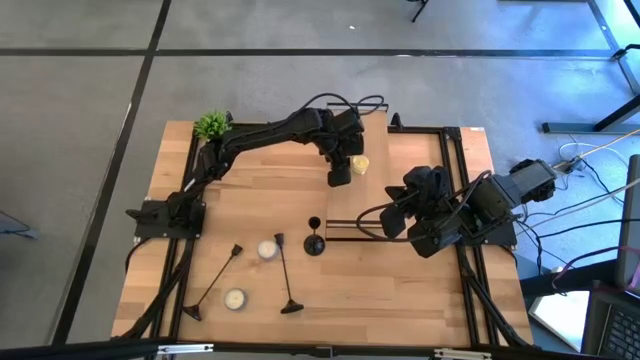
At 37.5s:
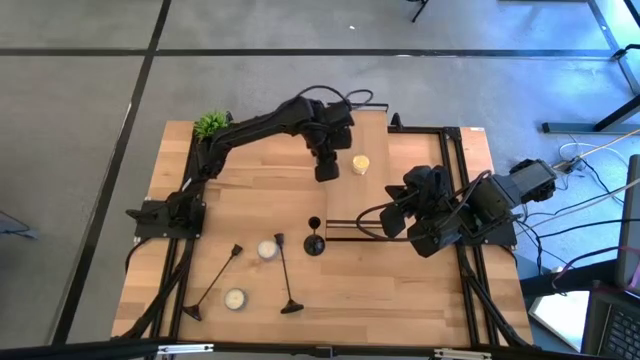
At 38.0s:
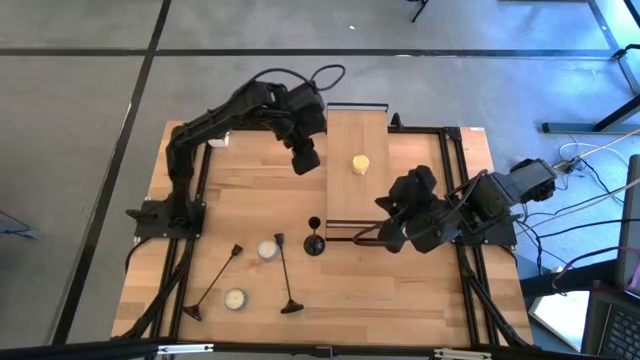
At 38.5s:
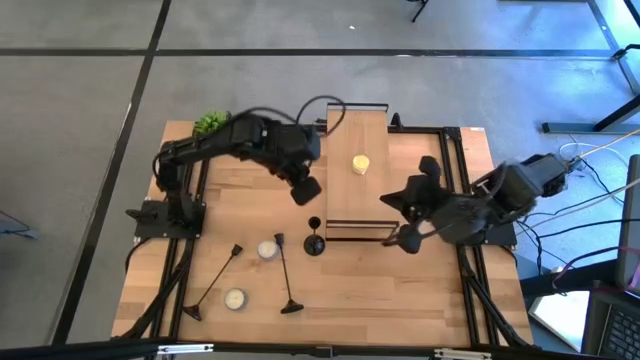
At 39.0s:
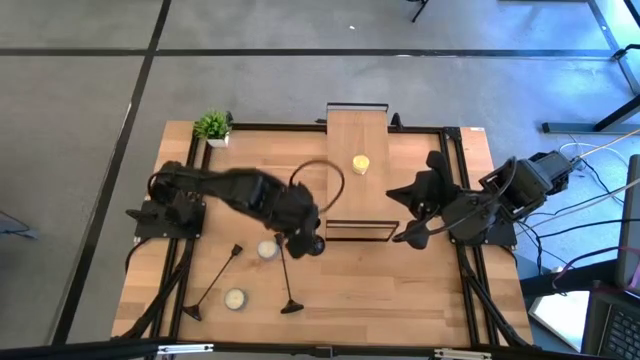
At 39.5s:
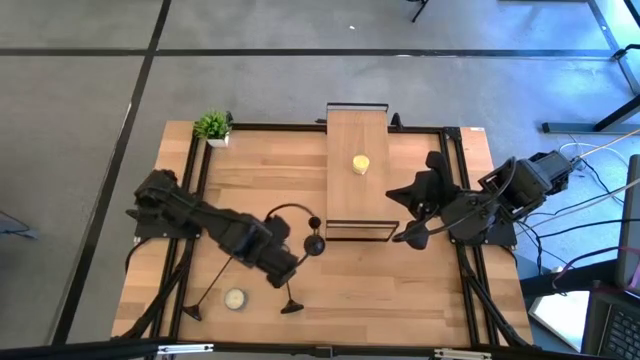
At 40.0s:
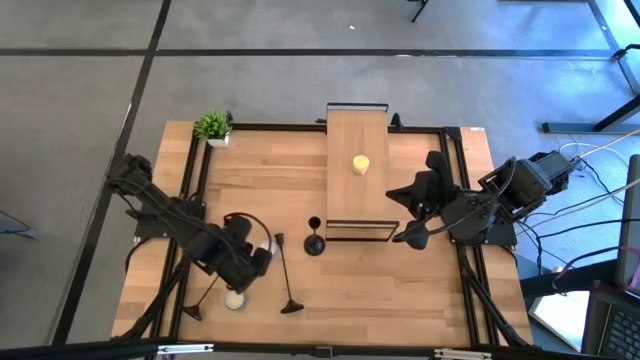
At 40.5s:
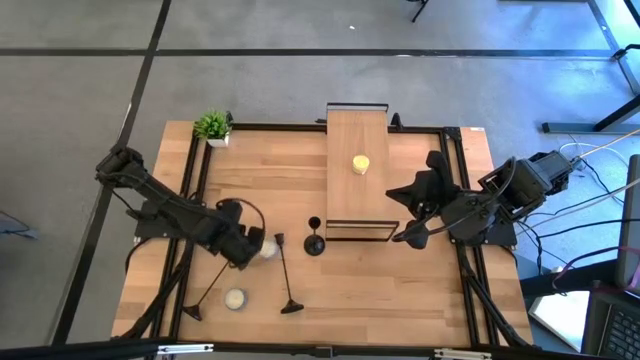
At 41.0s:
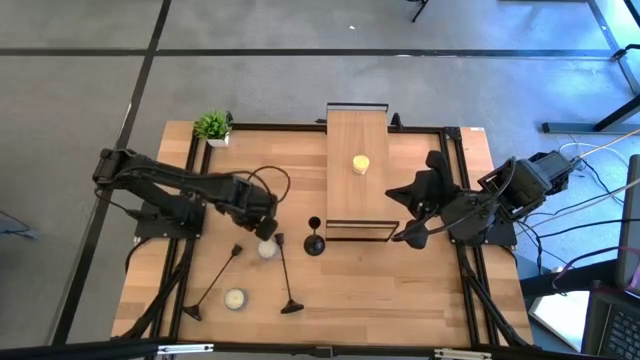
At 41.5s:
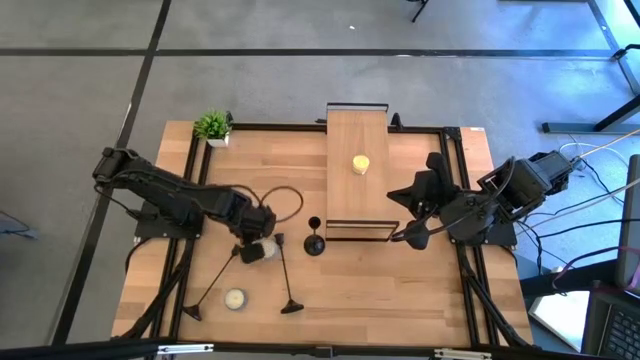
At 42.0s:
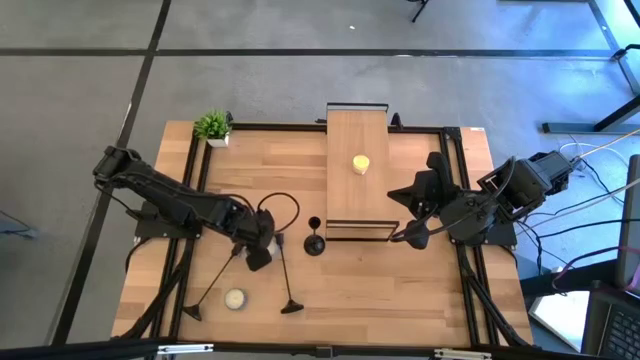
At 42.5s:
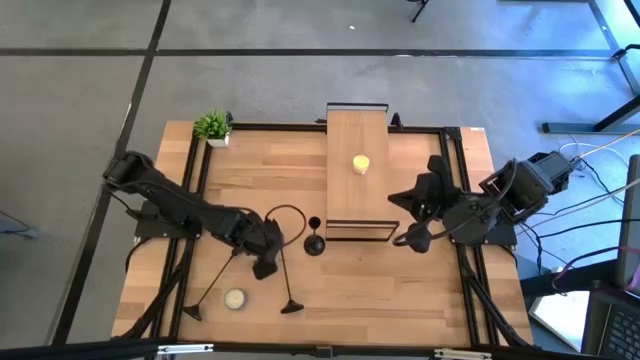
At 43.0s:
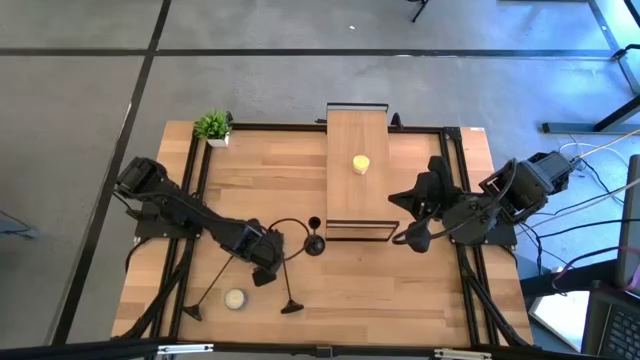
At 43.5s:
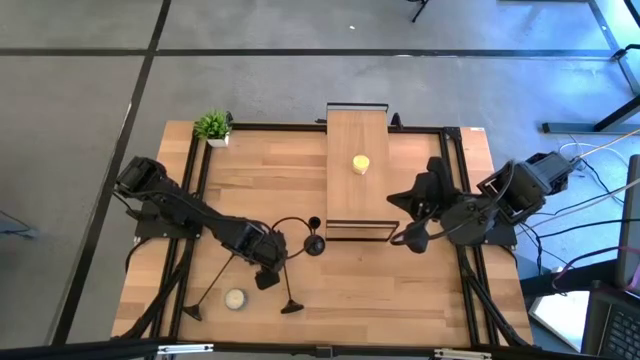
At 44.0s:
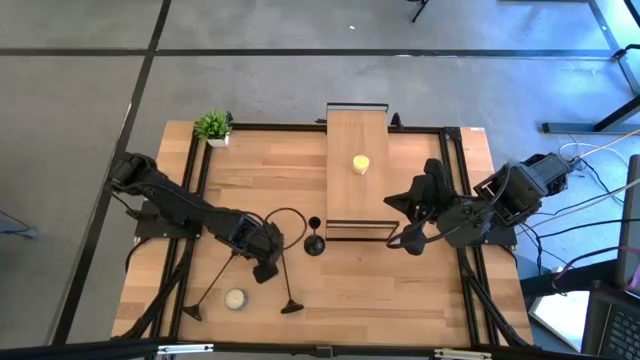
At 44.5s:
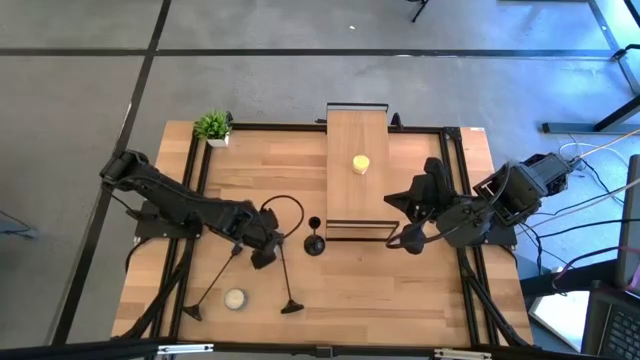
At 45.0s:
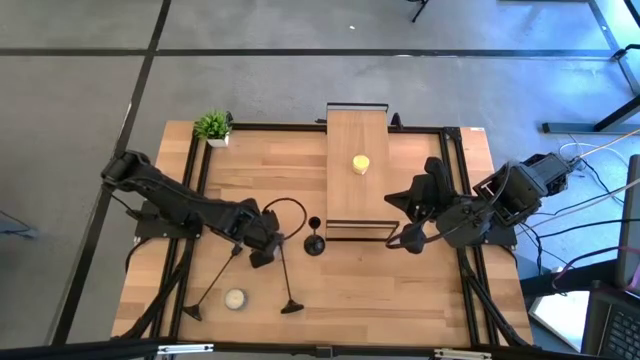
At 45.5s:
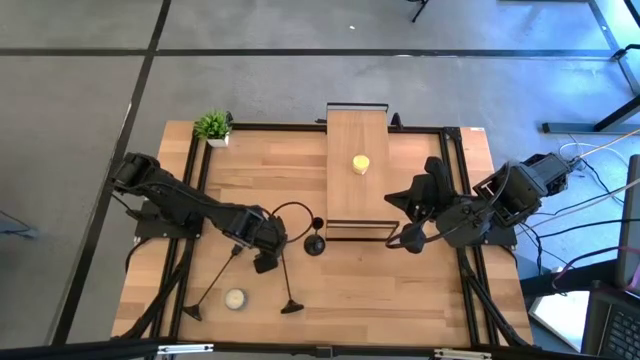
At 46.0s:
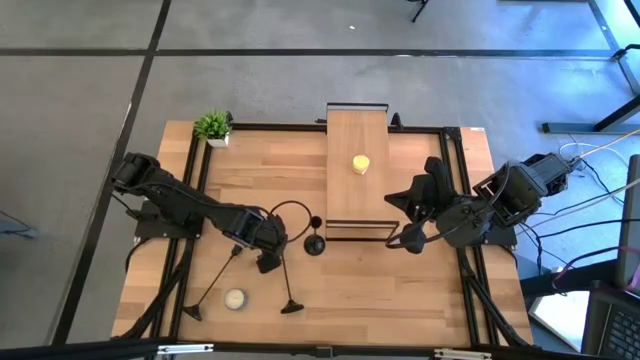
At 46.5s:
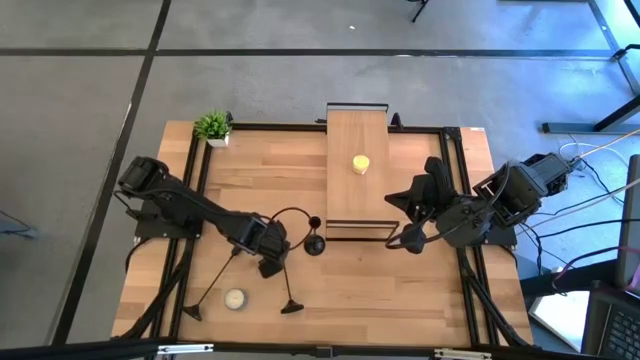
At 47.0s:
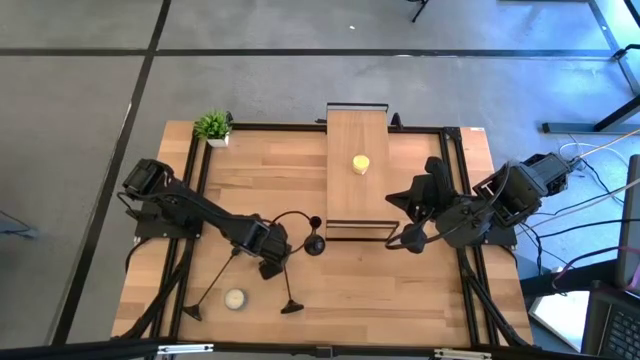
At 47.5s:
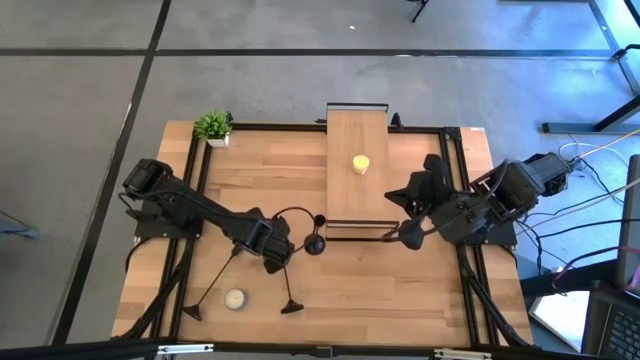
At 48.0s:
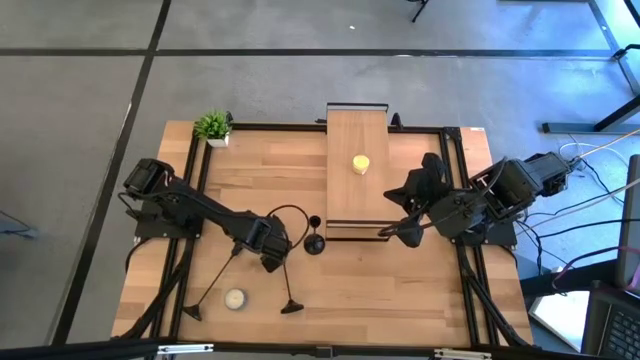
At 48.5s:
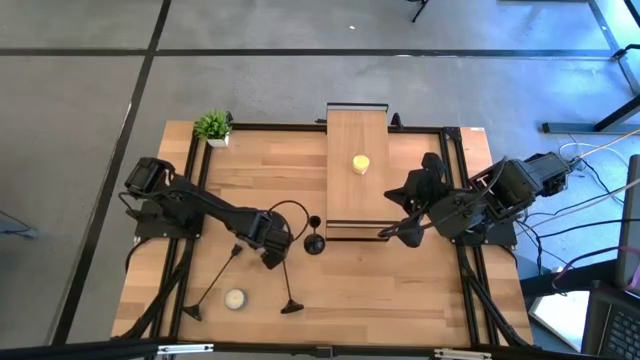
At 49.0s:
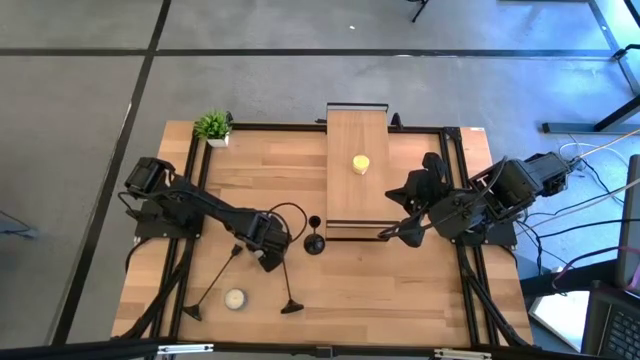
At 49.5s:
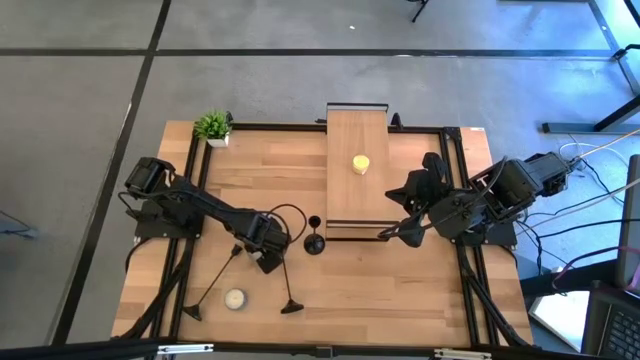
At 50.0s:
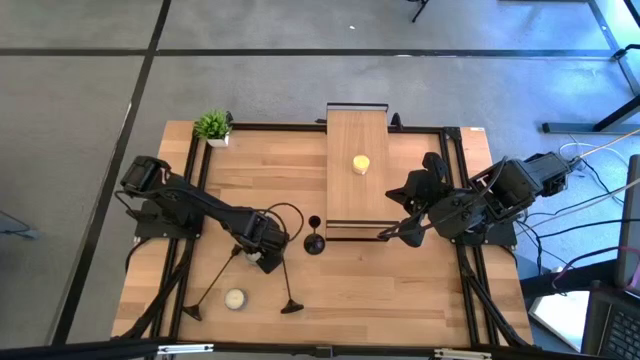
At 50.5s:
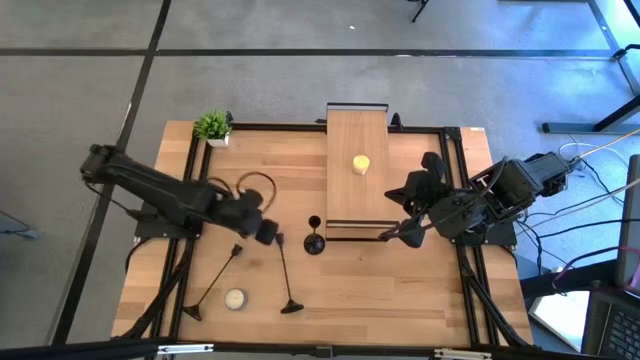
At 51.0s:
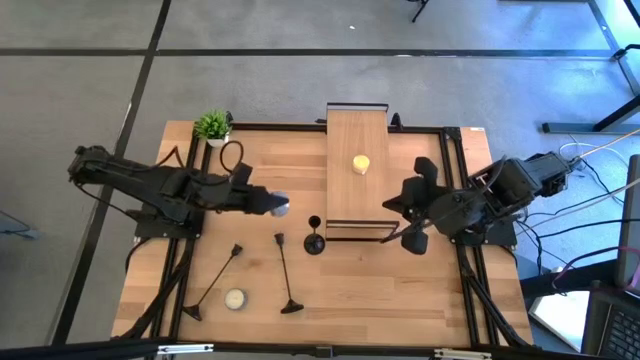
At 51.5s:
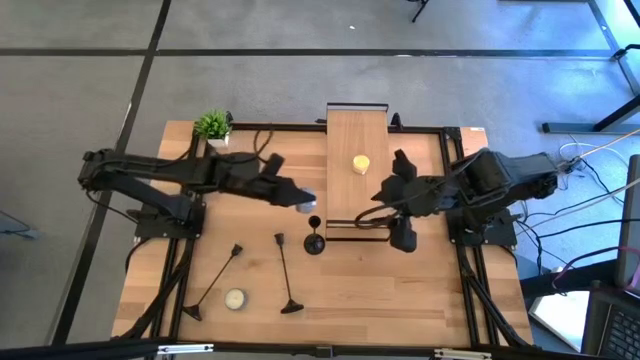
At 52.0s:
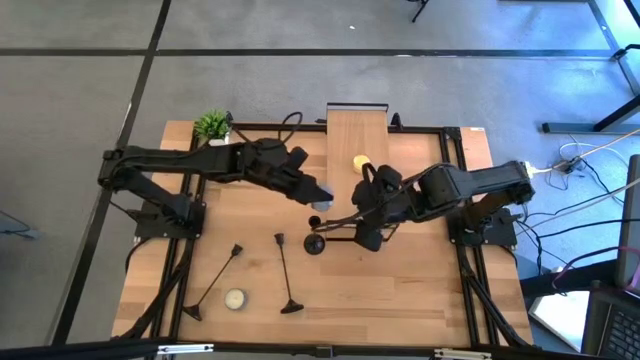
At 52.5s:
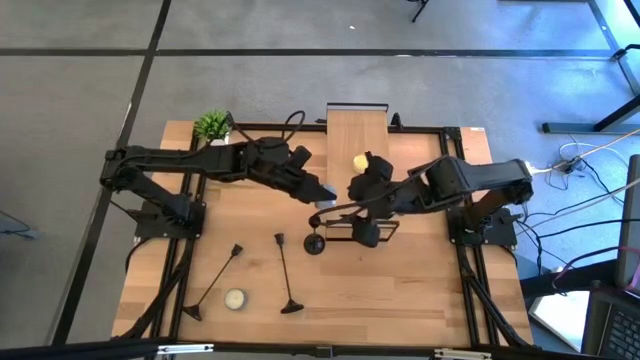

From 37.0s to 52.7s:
Task: Pick & Place candle stick holders
Put the top blue jar candle in the top left corner of the shelf

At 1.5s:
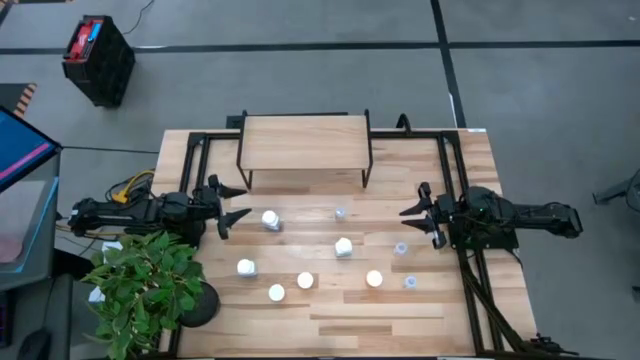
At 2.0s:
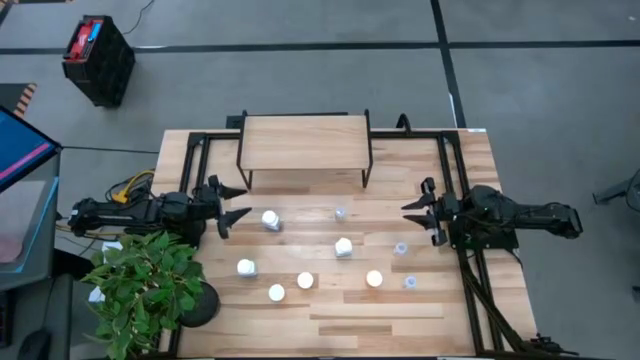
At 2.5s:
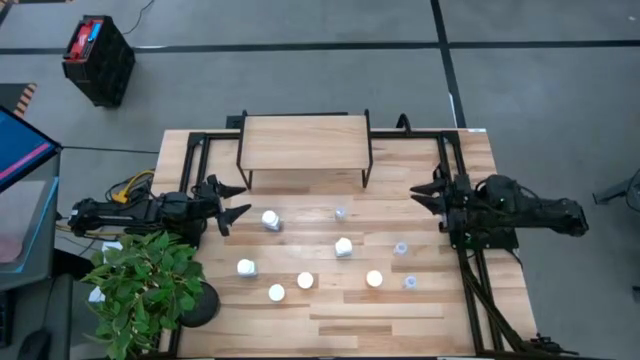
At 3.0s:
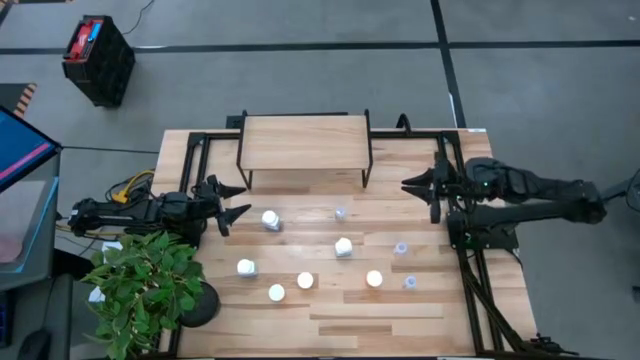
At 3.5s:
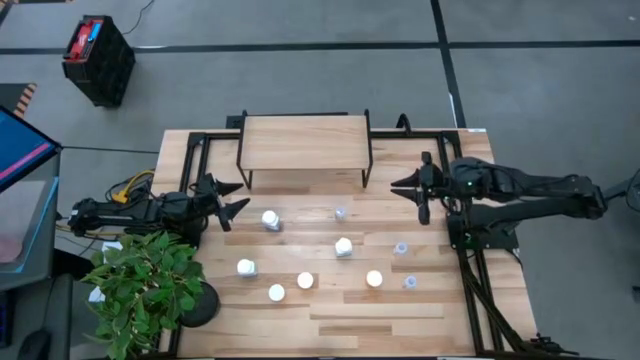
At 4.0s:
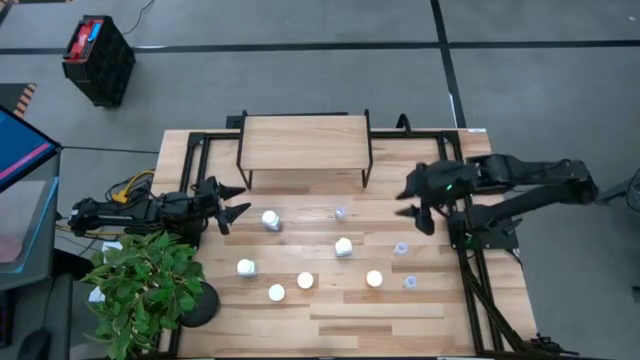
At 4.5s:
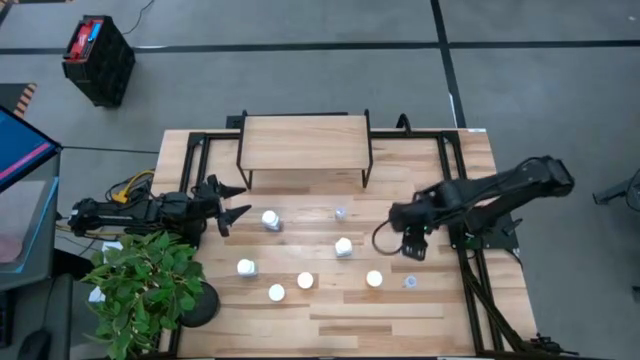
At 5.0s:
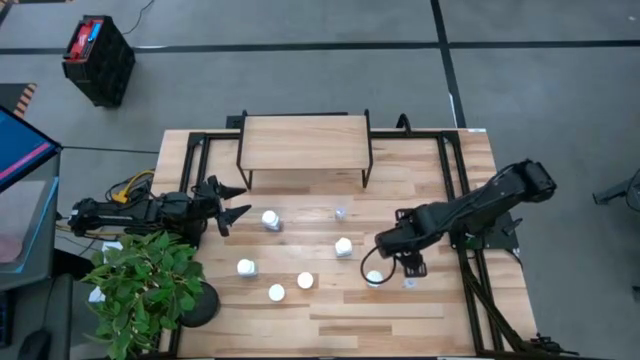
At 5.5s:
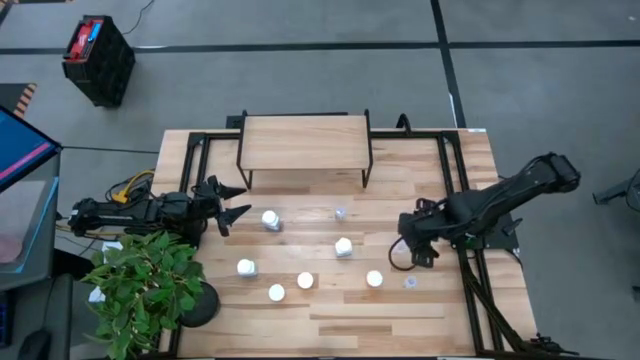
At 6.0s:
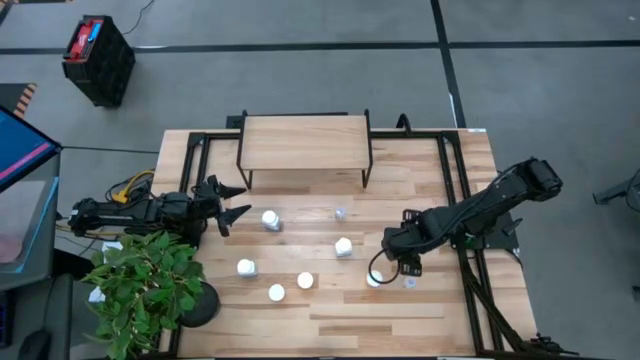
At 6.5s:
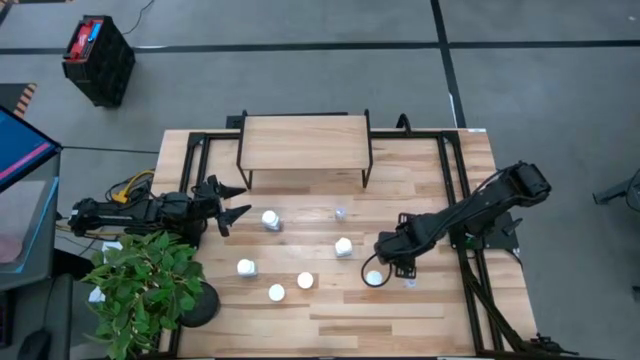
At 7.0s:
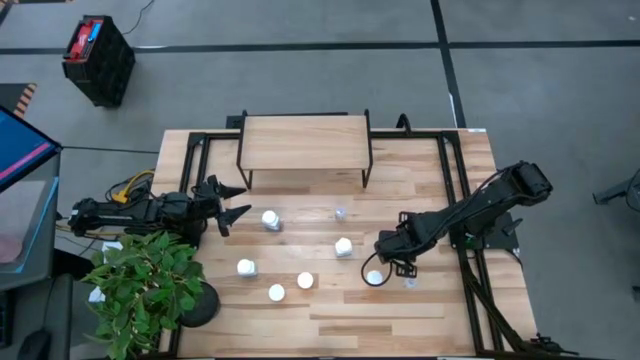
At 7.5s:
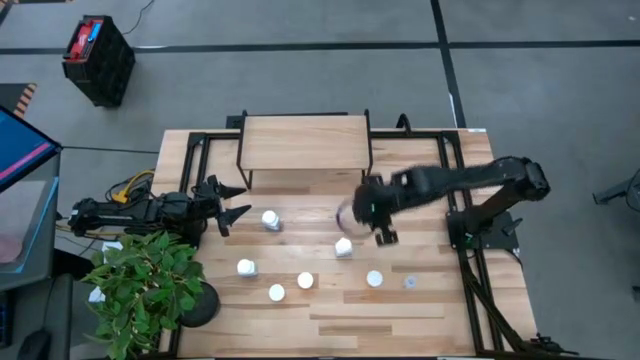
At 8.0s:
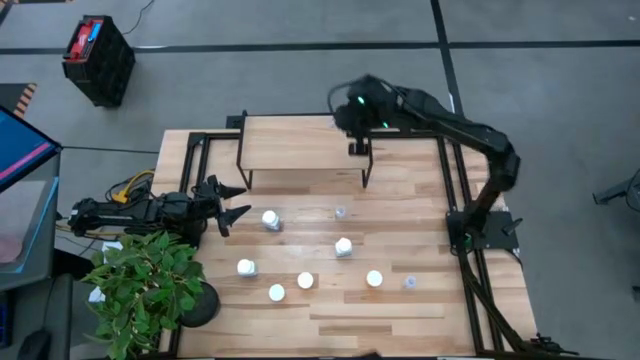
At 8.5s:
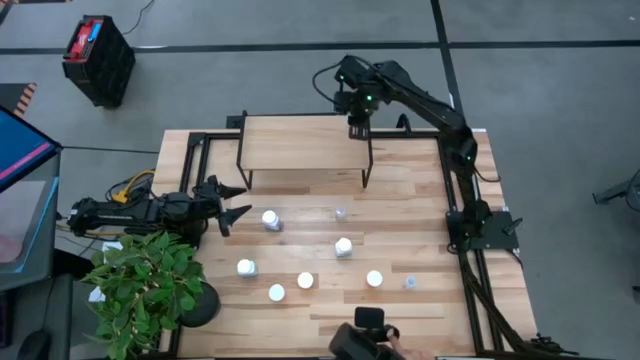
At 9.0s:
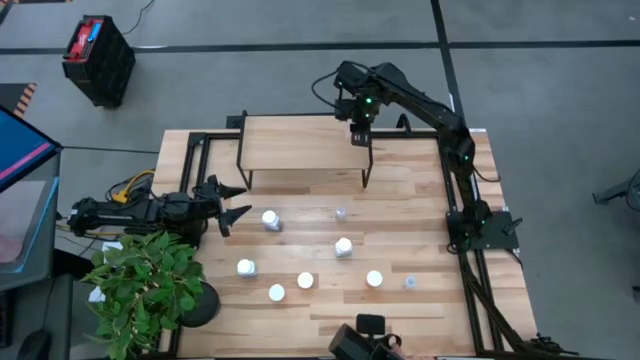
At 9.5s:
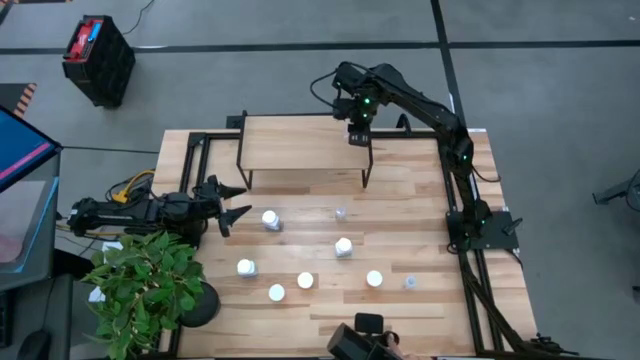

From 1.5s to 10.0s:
Task: Pick and place medicine bottles onto shelf by color
Put the middle transparent pill bottle on the shelf
